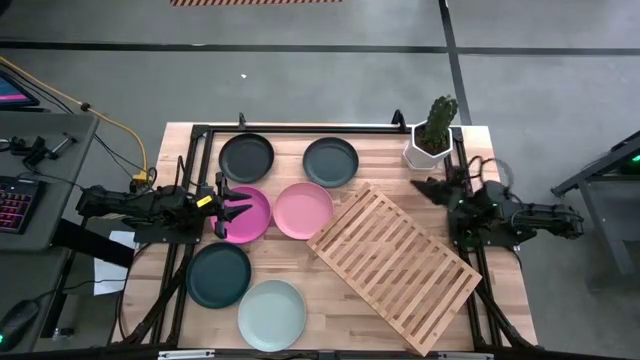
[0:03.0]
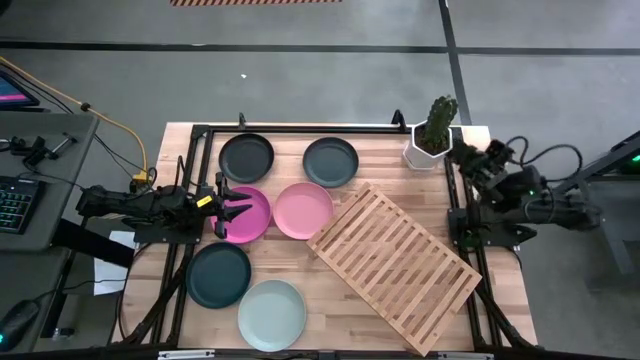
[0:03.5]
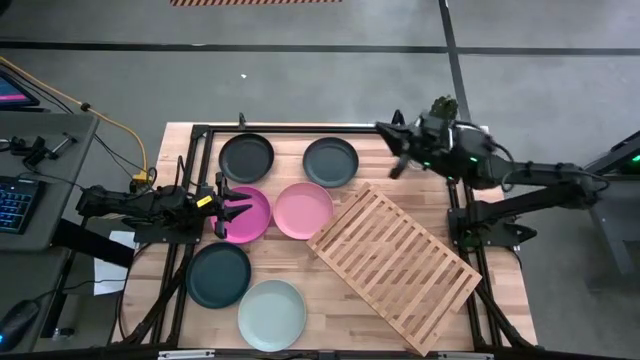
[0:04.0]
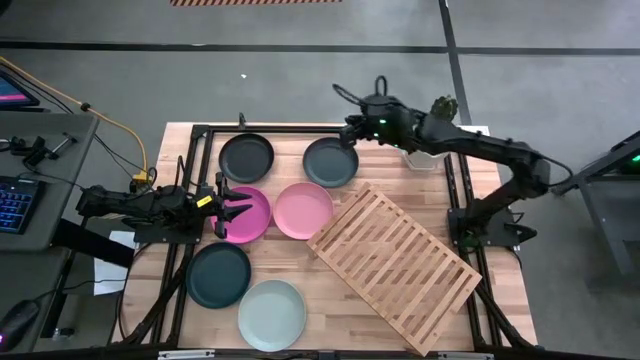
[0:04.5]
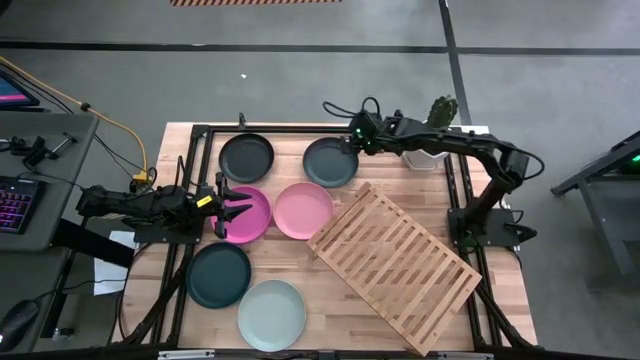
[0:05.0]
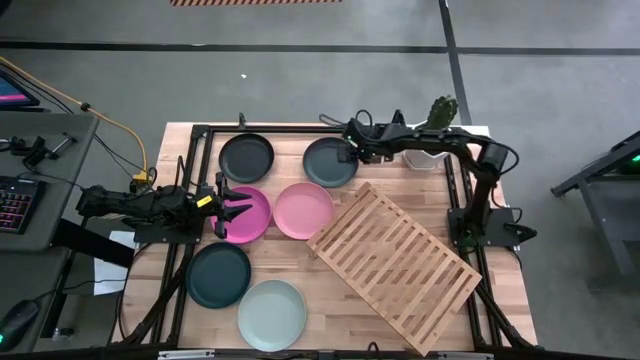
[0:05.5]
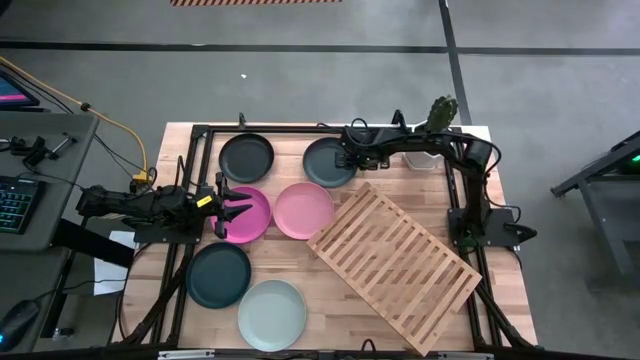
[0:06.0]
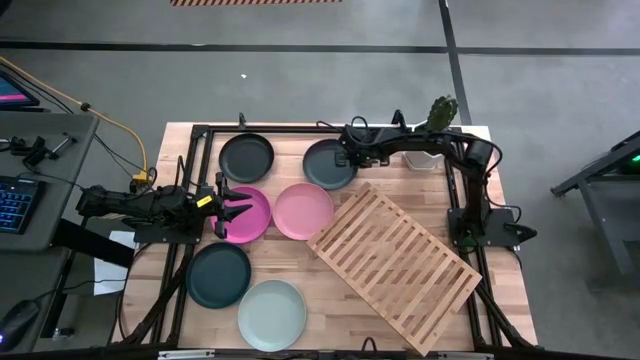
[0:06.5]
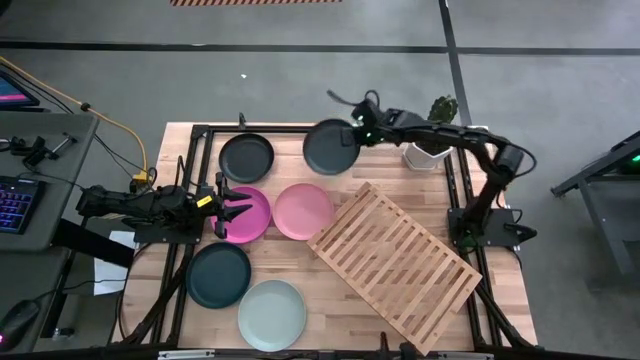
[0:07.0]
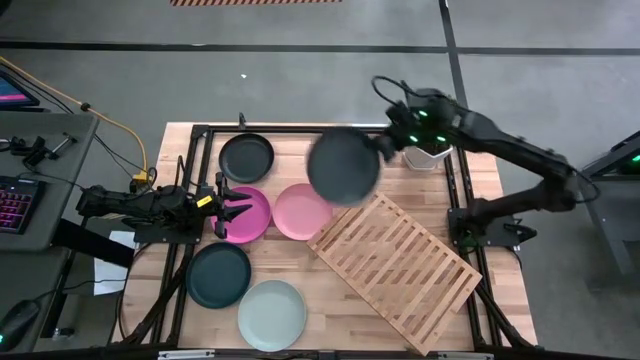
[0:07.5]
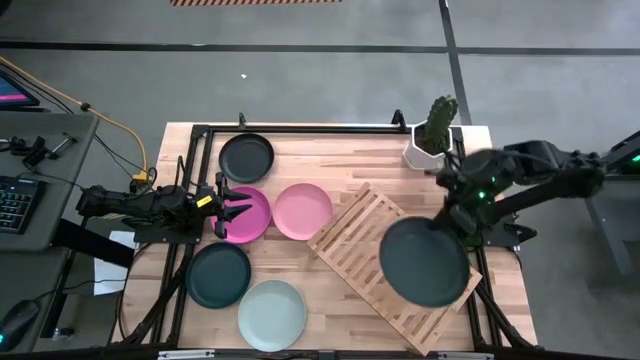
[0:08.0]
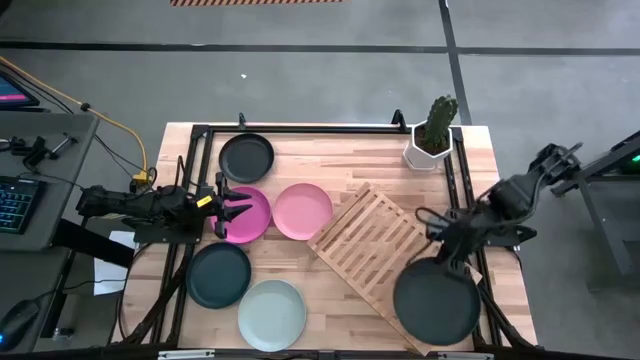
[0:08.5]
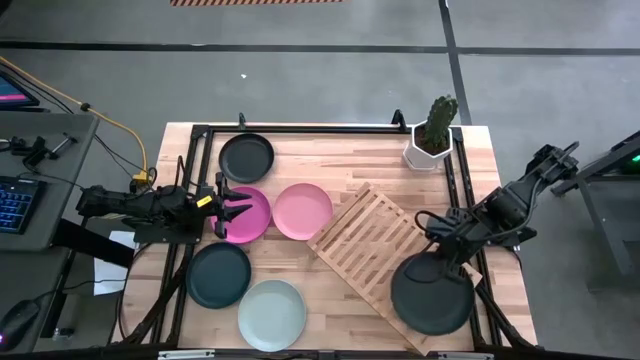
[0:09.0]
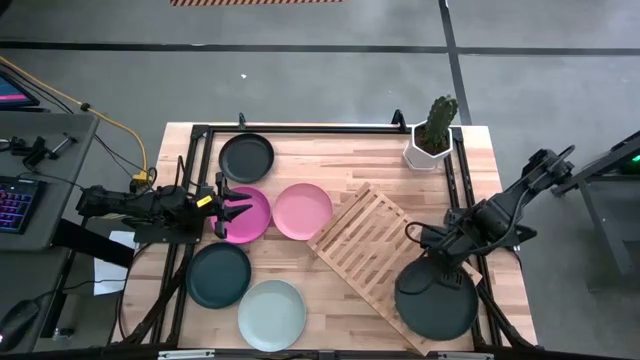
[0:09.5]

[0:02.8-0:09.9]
Task: Place and stack plates onto a shelf
Put the right black plate on the shelf

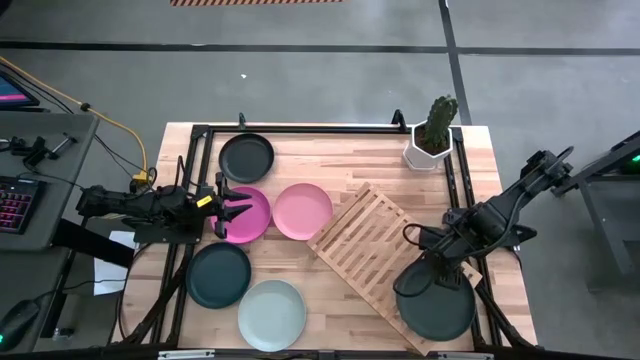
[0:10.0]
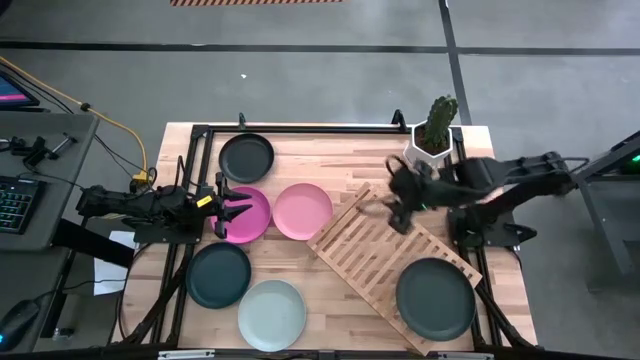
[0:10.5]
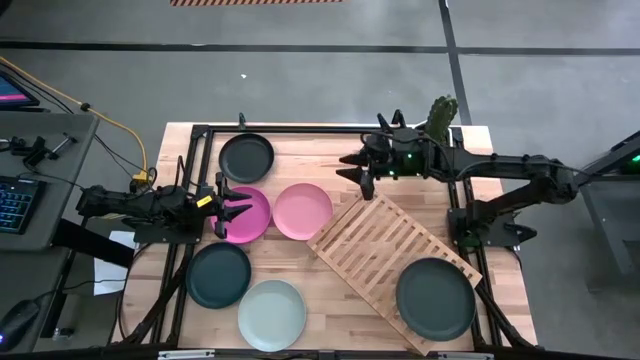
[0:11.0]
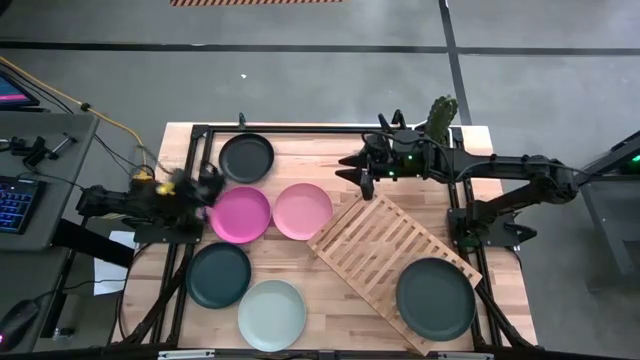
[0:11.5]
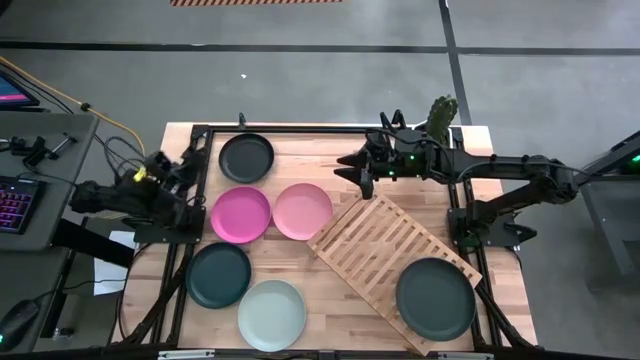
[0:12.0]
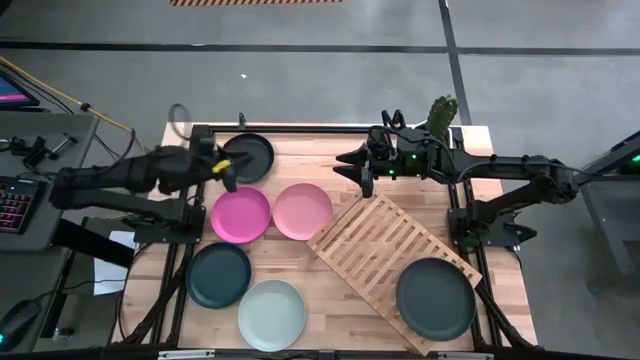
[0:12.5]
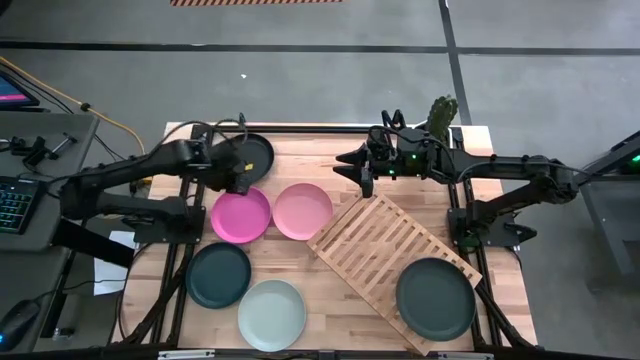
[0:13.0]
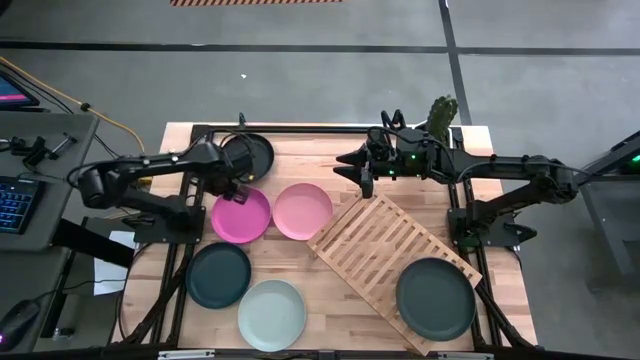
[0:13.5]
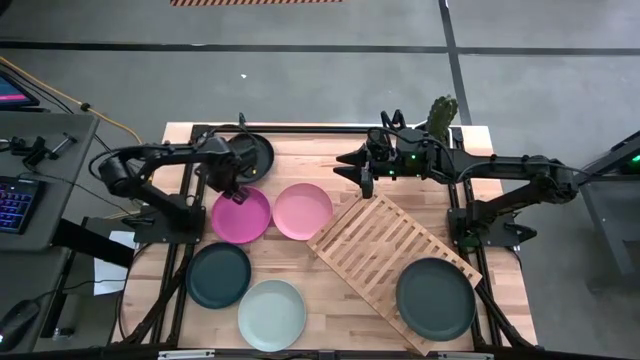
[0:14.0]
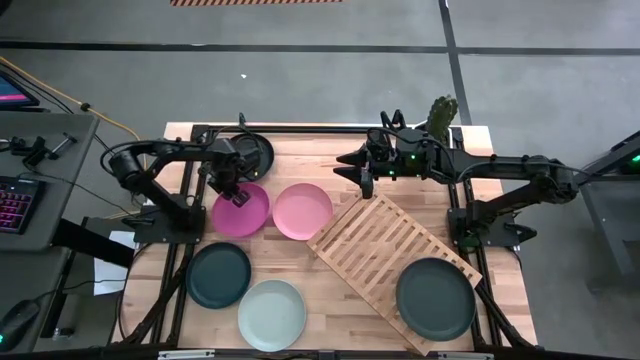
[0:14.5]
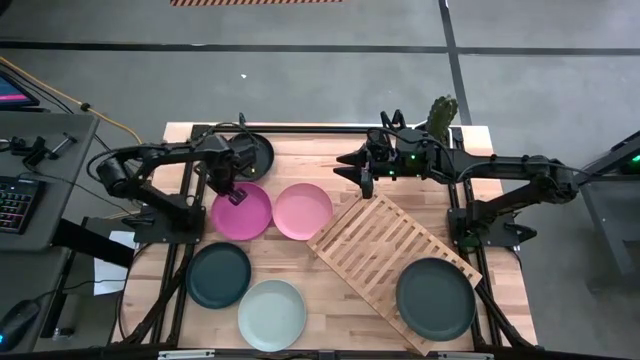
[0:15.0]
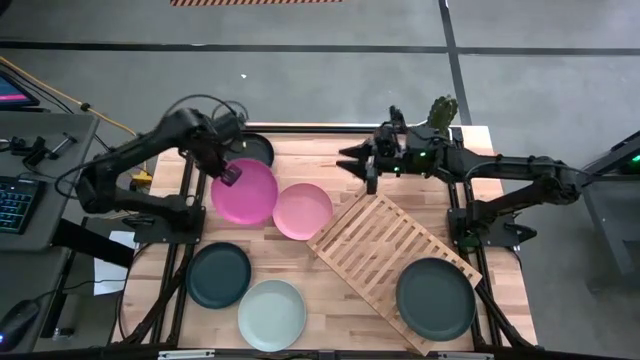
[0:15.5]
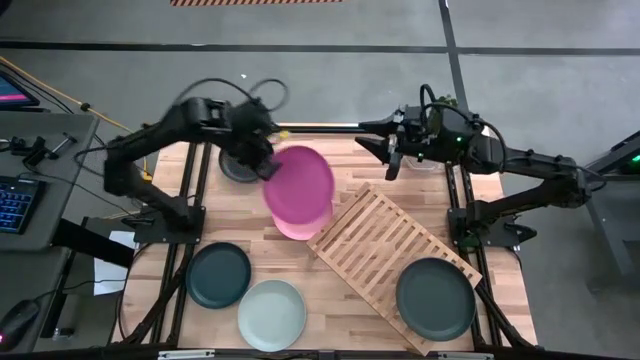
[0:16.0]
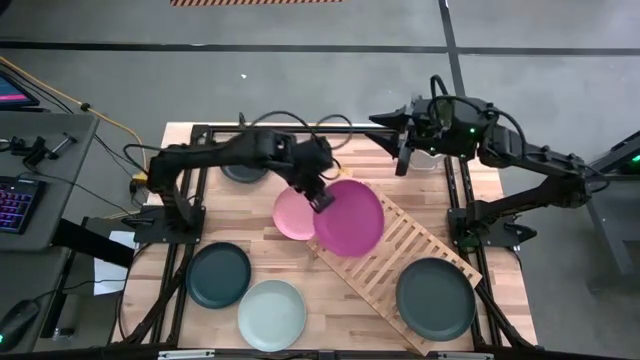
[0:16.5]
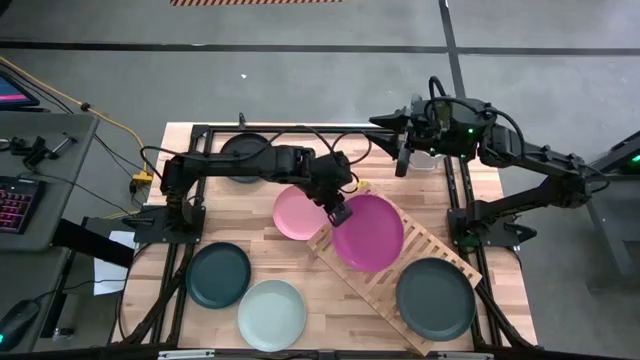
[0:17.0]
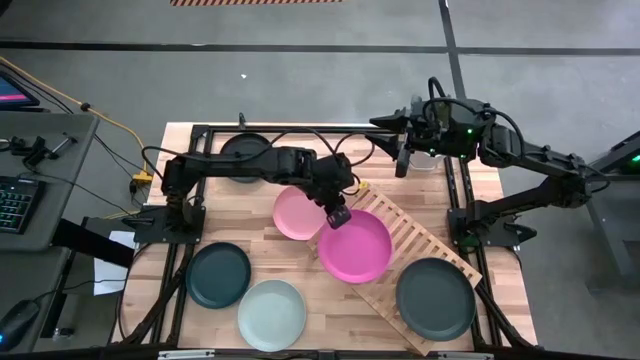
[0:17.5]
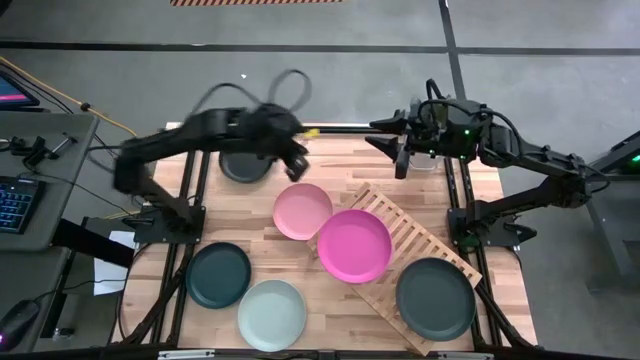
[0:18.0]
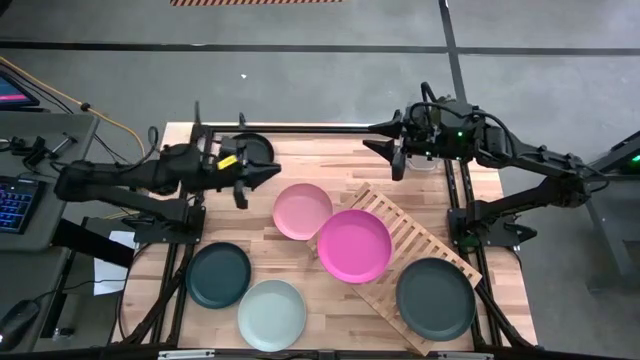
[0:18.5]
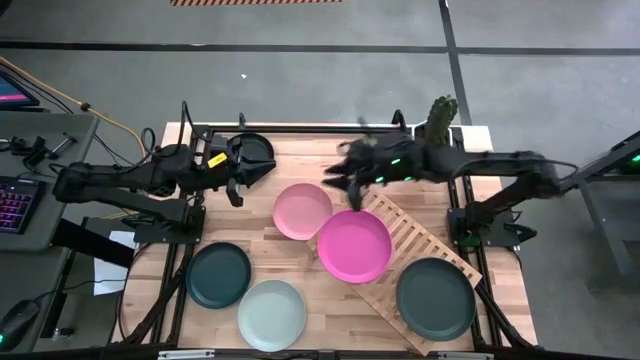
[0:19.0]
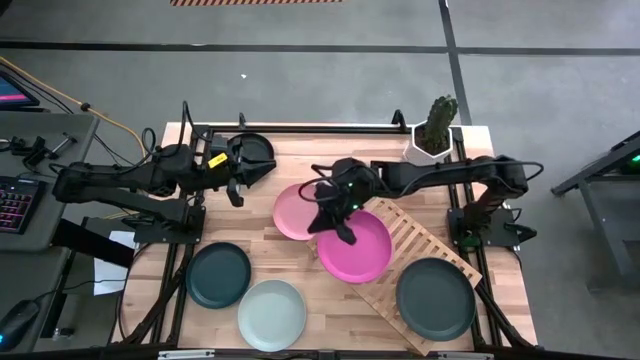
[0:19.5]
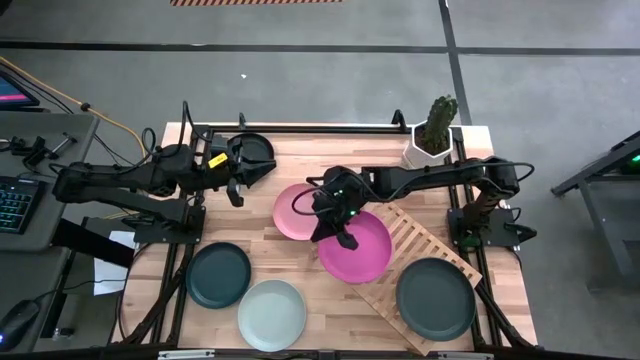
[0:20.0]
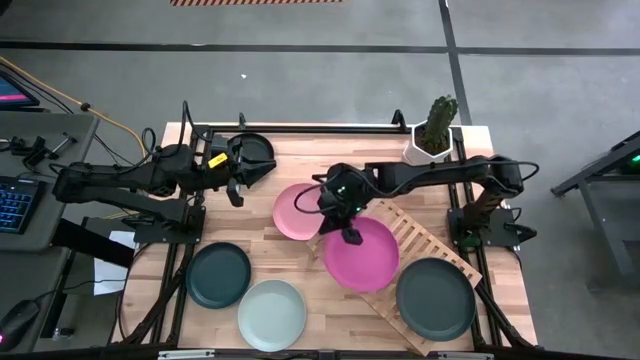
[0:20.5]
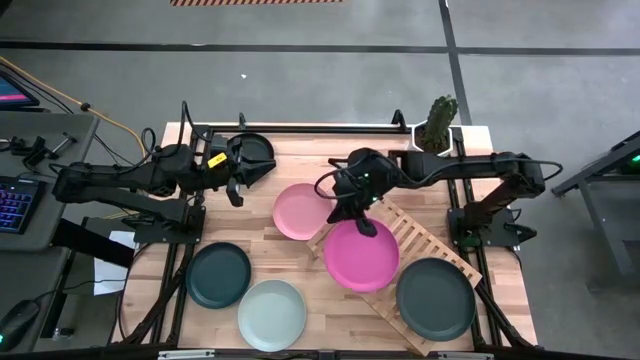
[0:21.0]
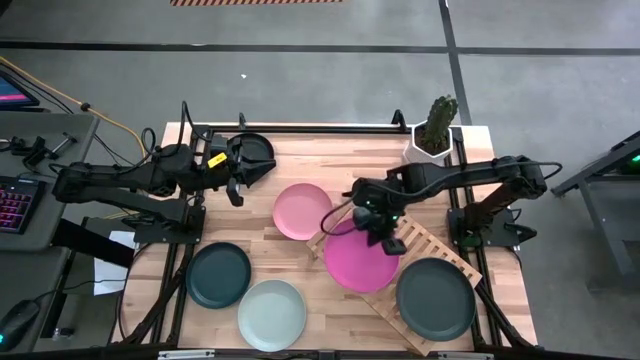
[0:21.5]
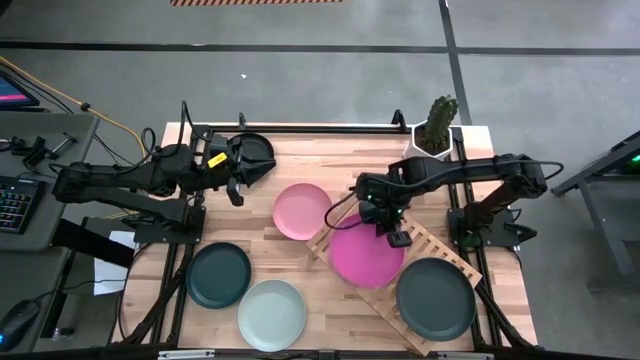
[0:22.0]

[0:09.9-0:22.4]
Put the pink plate on the shelf
